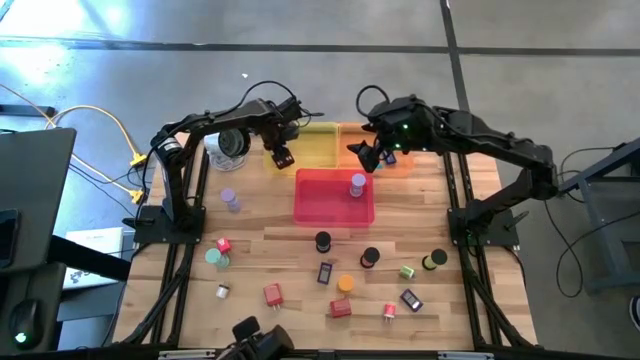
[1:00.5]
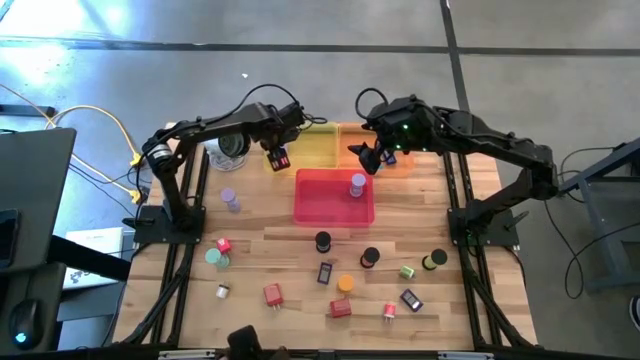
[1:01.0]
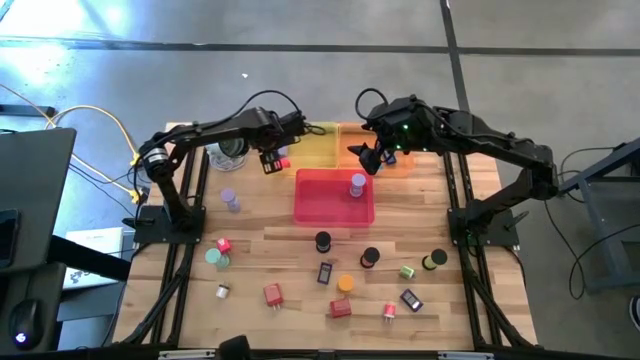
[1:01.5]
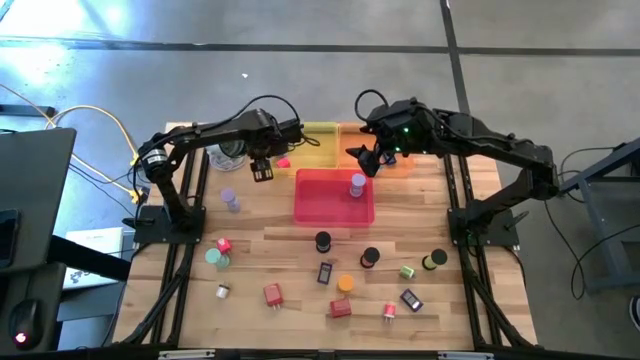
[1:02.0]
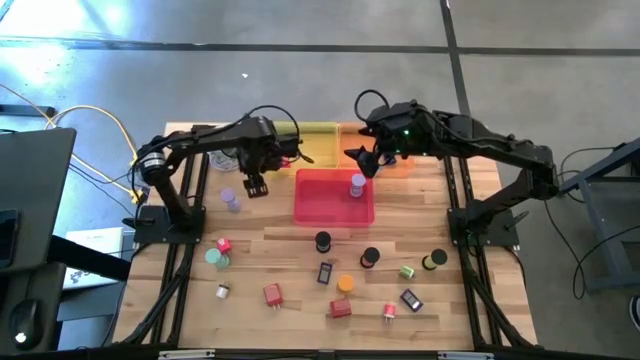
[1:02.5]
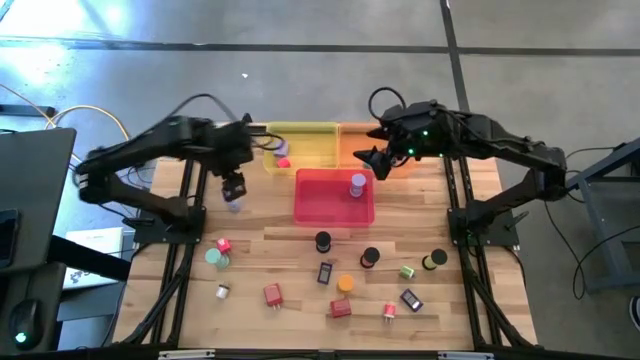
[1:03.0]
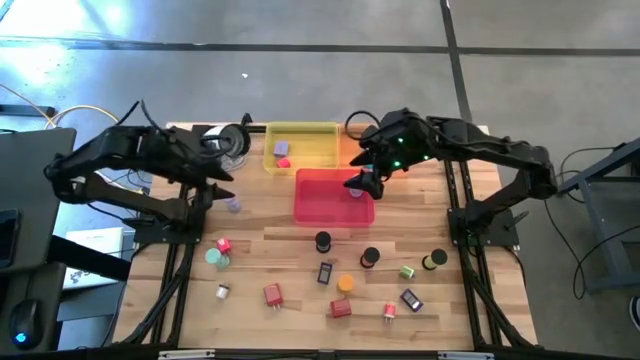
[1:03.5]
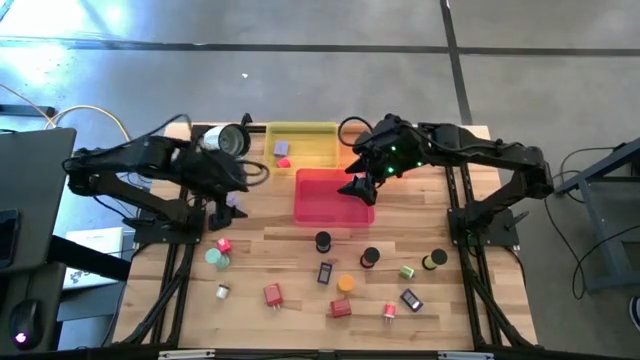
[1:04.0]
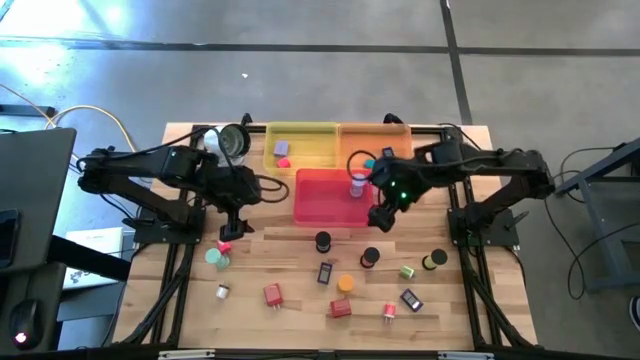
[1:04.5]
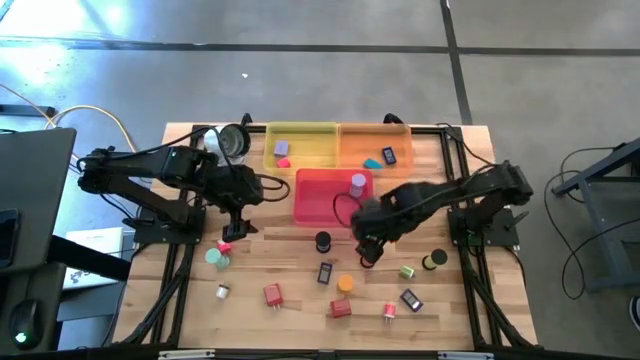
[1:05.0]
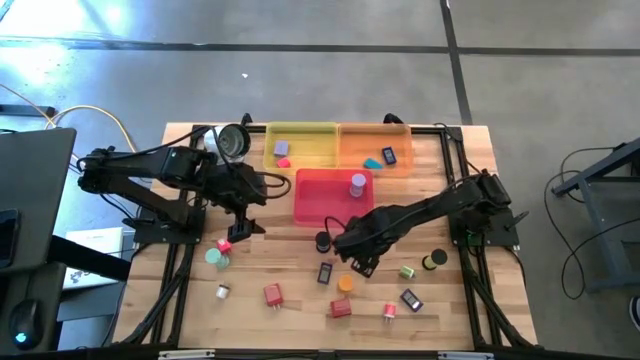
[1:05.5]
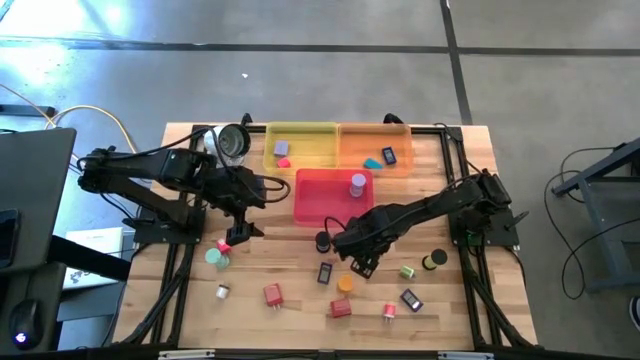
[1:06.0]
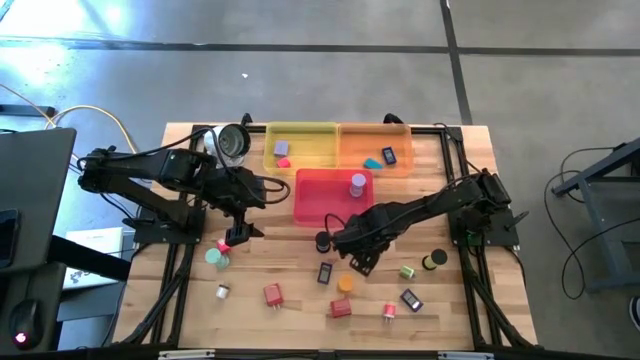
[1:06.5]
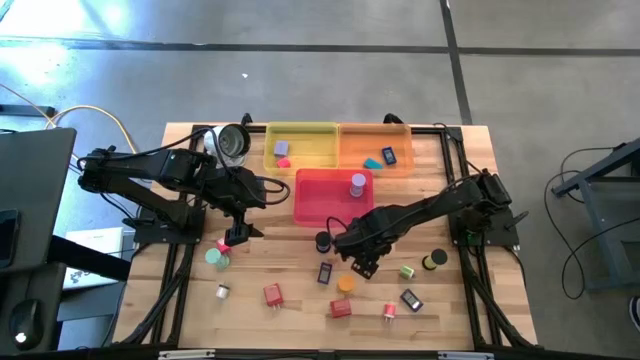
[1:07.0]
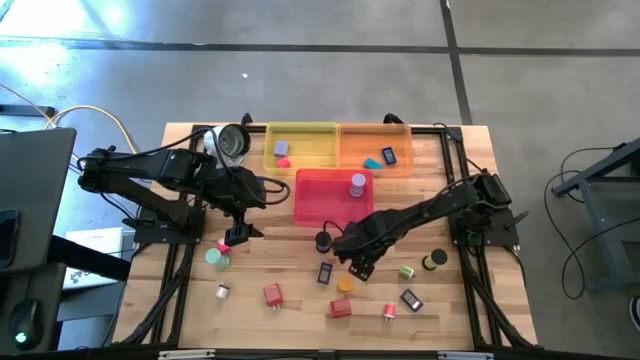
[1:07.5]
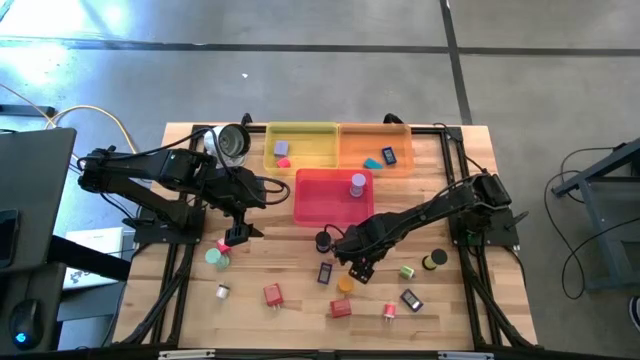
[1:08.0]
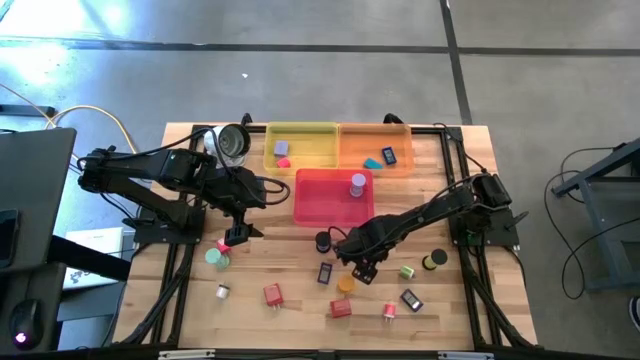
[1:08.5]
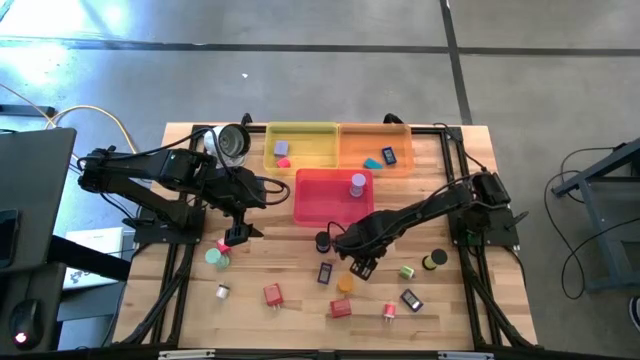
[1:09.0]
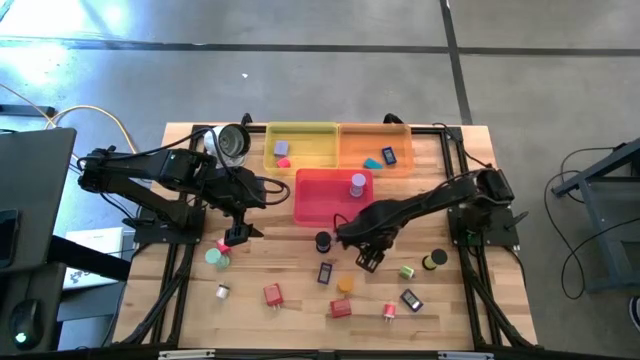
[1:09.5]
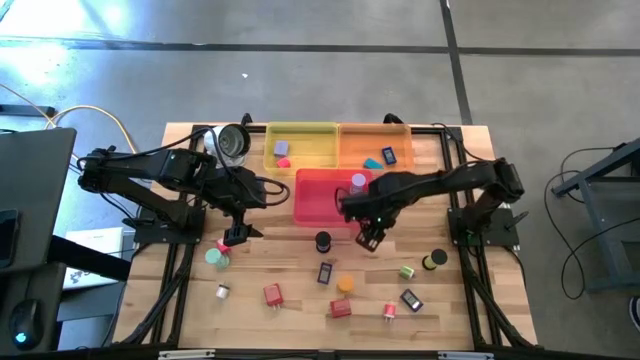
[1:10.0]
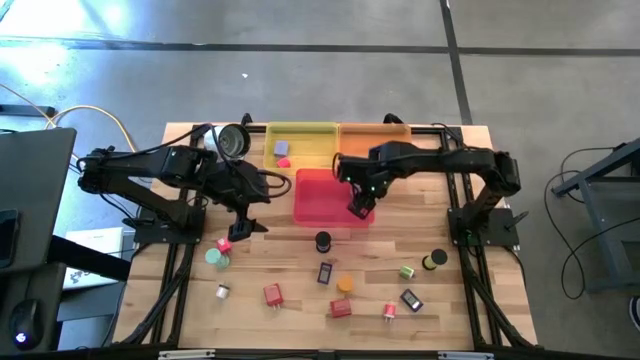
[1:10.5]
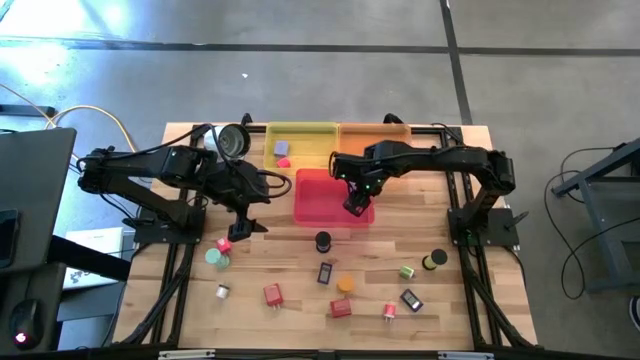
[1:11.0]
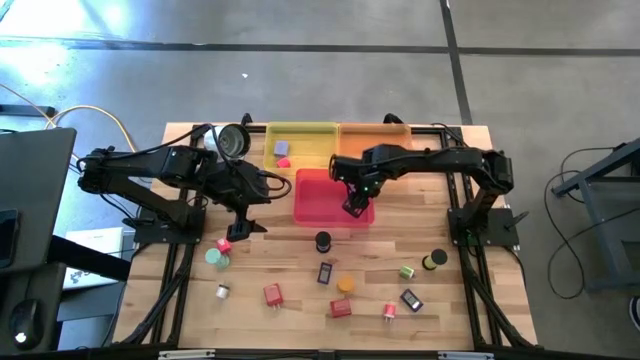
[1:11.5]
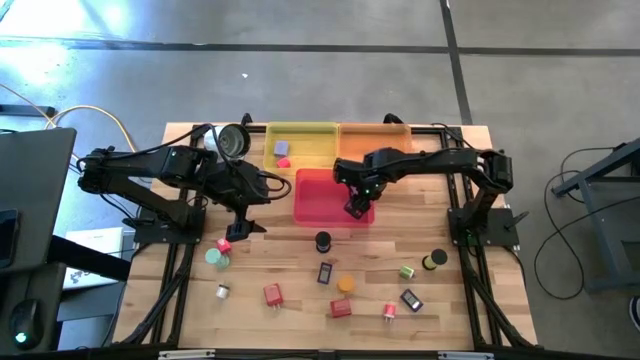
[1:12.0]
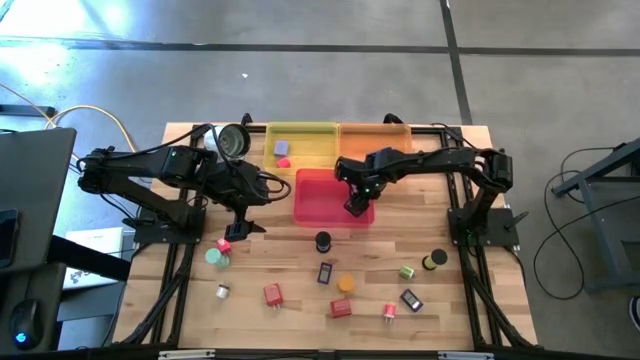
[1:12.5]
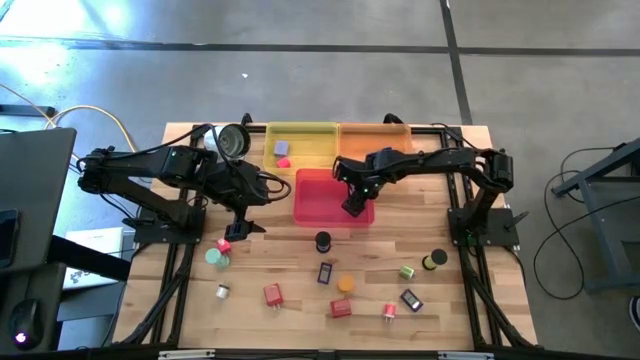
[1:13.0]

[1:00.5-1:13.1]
Task: Pick & Place Office items
Put the middle black hourglass into the red bin

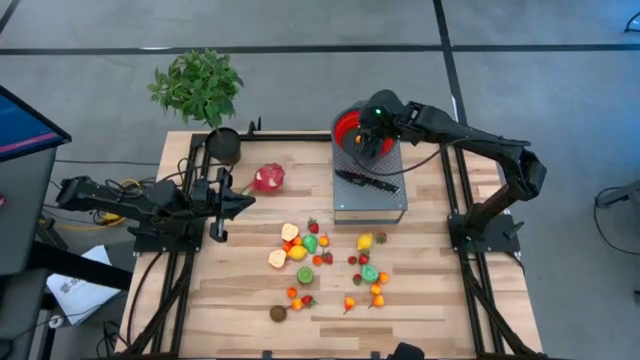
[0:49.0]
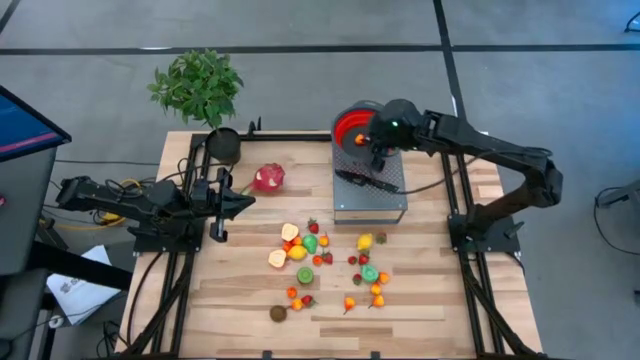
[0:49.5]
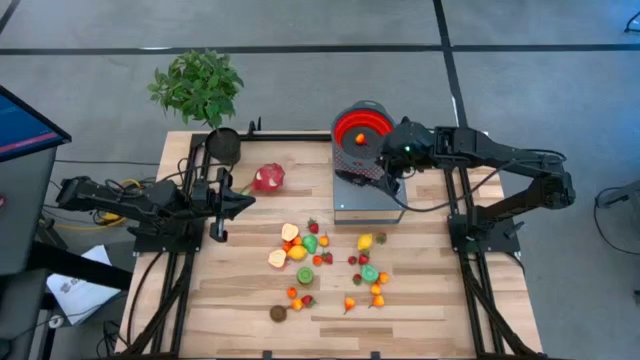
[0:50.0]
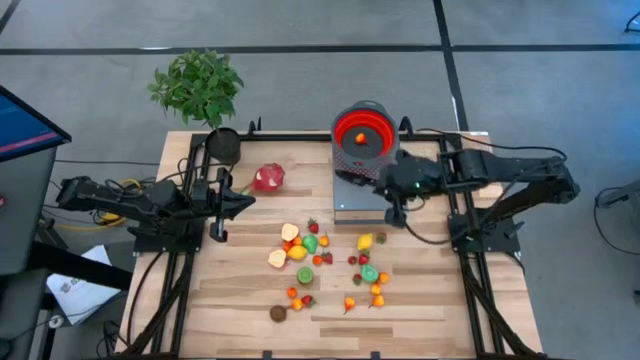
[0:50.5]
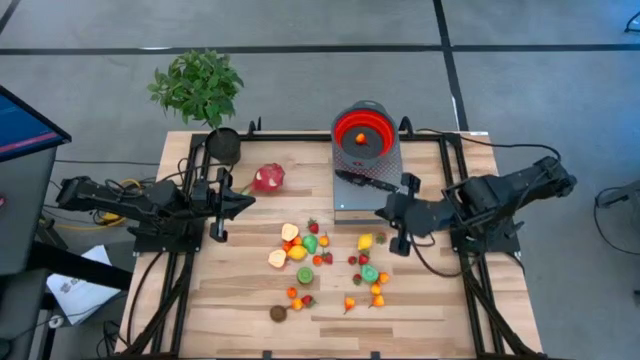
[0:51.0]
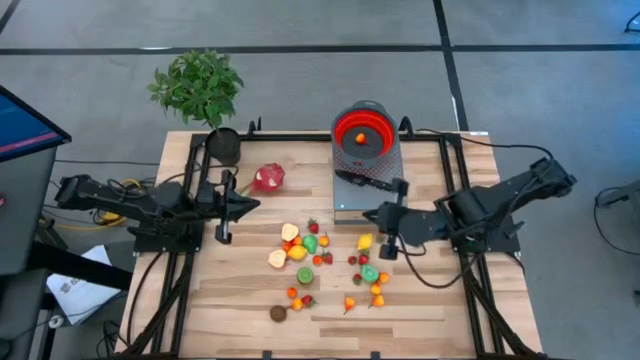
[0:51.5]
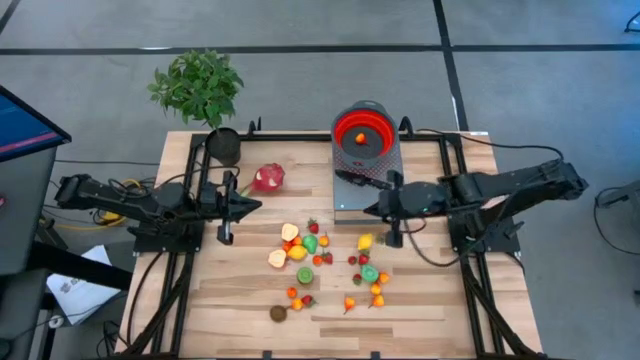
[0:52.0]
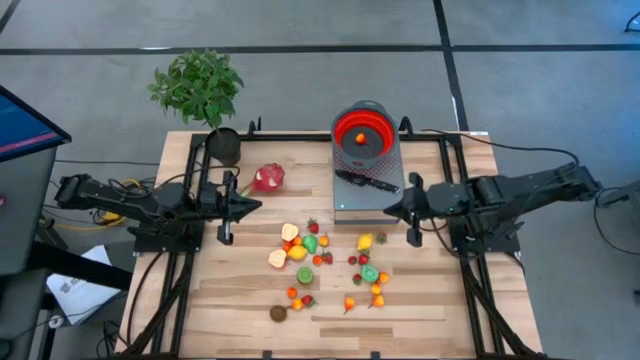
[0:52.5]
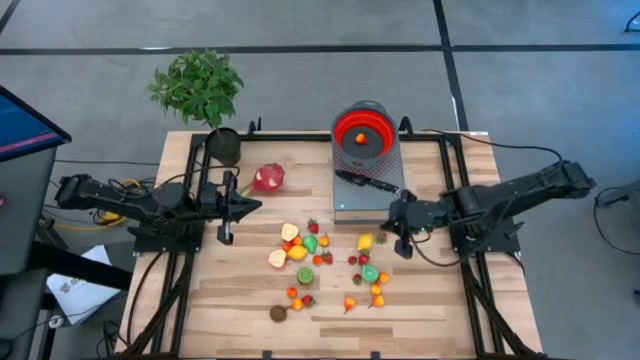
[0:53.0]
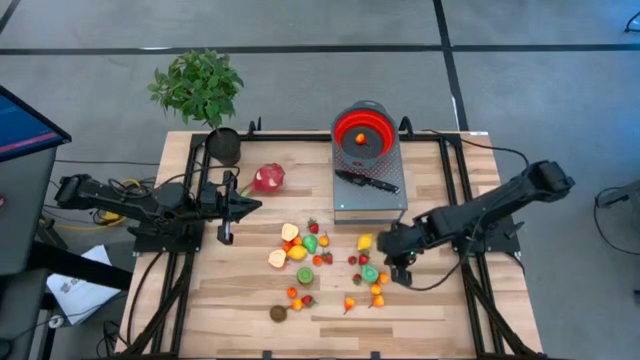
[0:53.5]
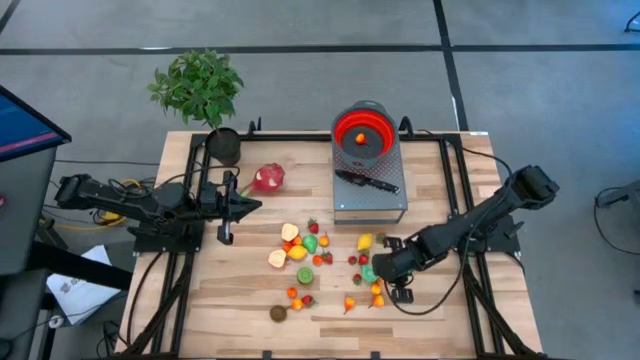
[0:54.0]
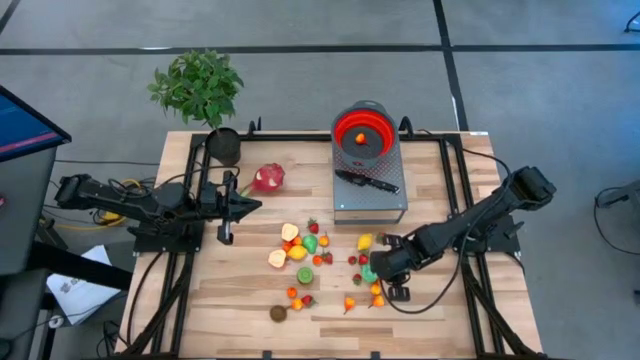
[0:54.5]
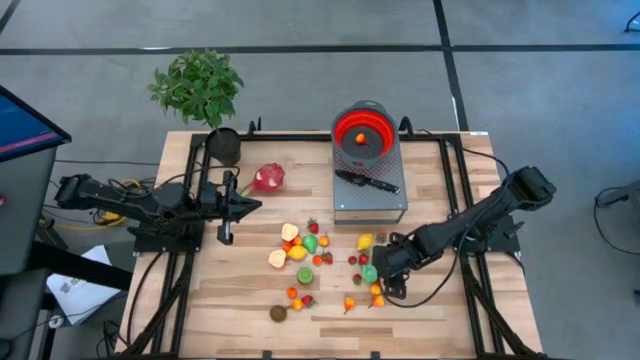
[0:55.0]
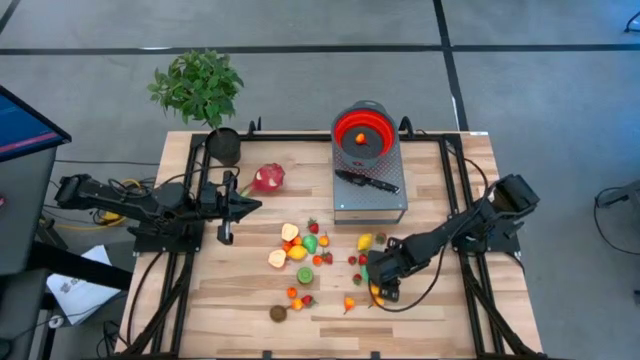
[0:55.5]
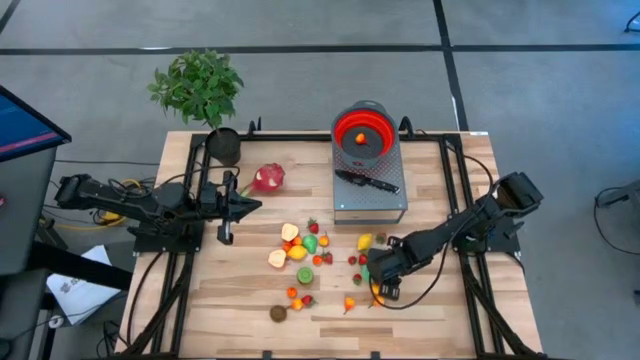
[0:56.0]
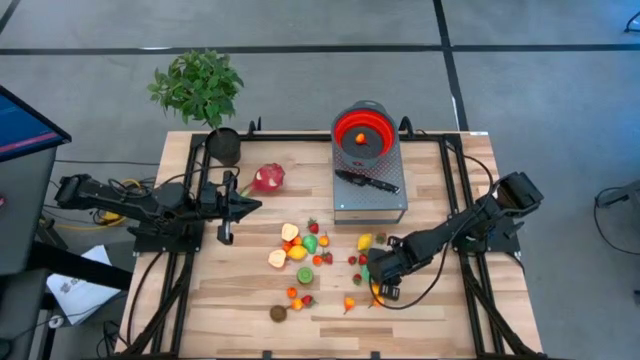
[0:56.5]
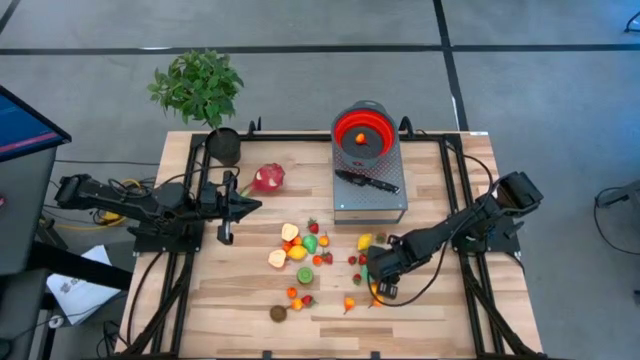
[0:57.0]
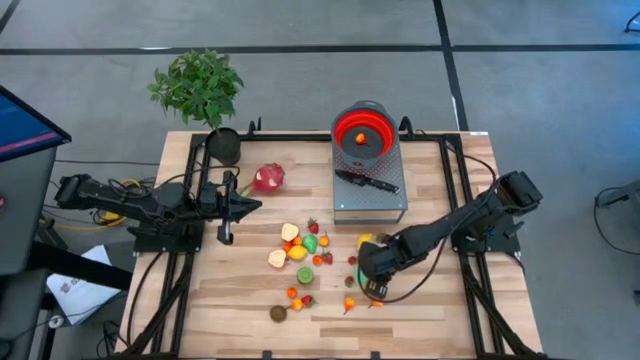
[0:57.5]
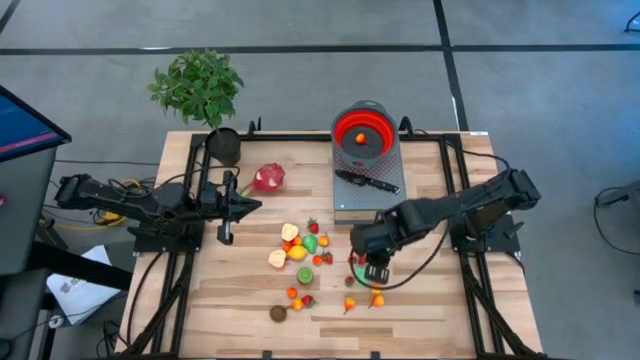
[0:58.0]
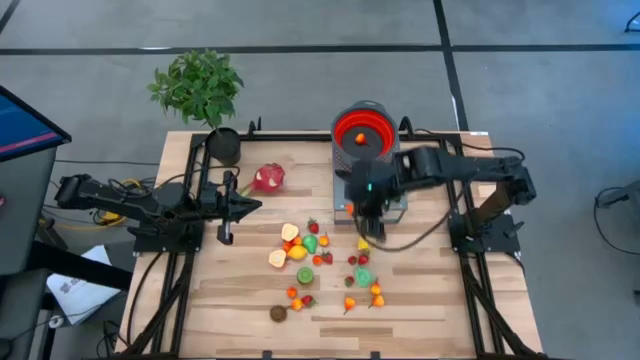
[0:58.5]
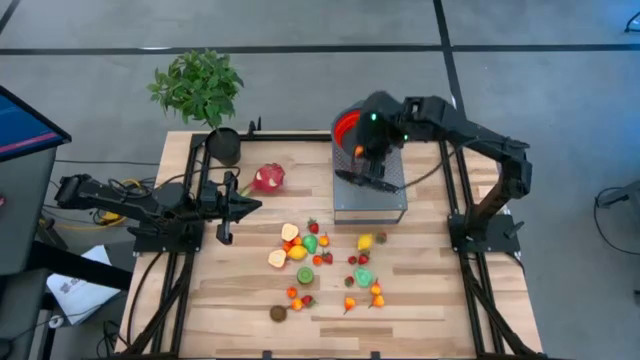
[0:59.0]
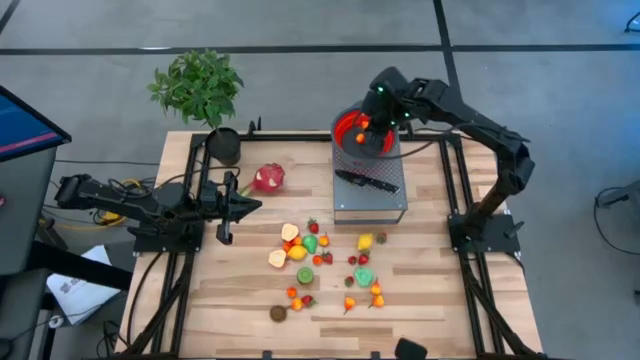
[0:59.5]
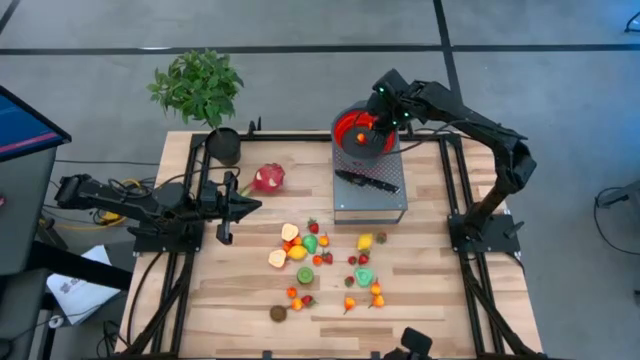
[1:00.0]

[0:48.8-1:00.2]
Task: Pick & Place Fruit
Put the yellow pear into the red colander on the shelf
